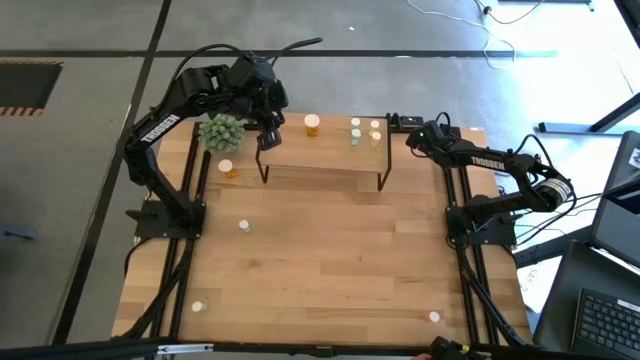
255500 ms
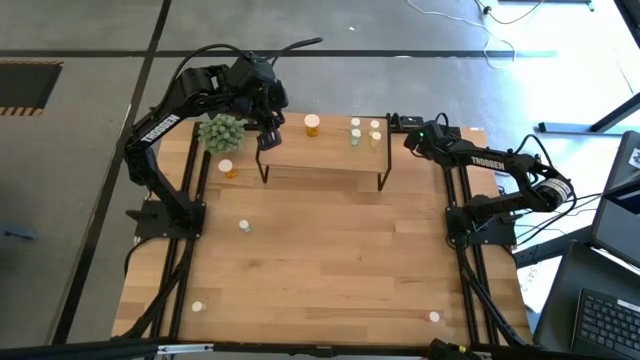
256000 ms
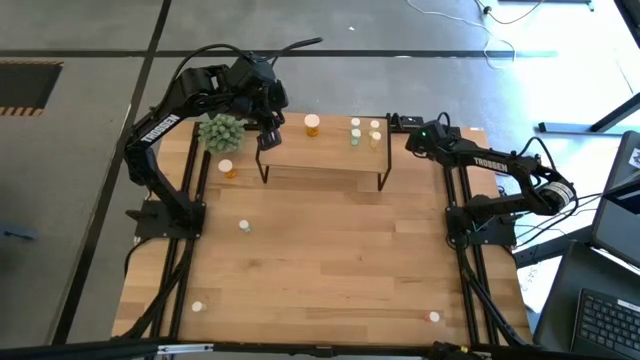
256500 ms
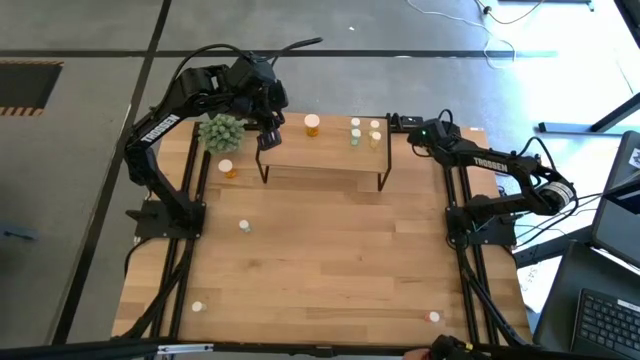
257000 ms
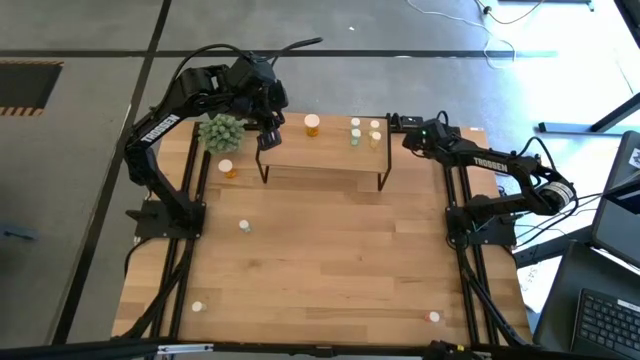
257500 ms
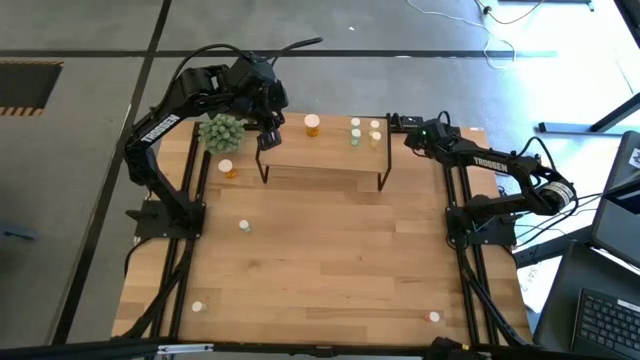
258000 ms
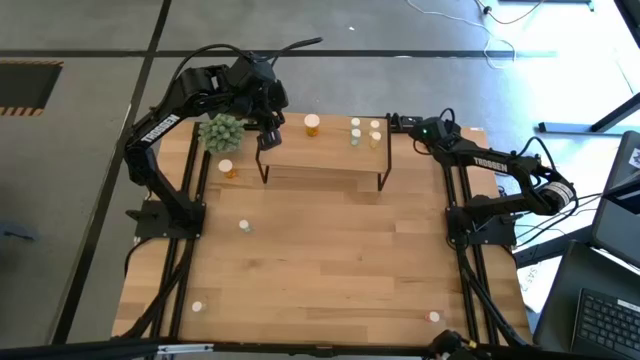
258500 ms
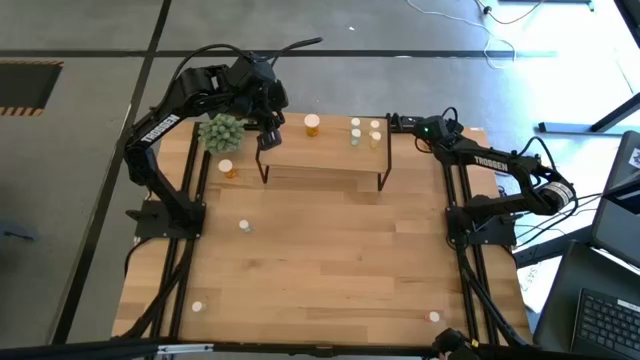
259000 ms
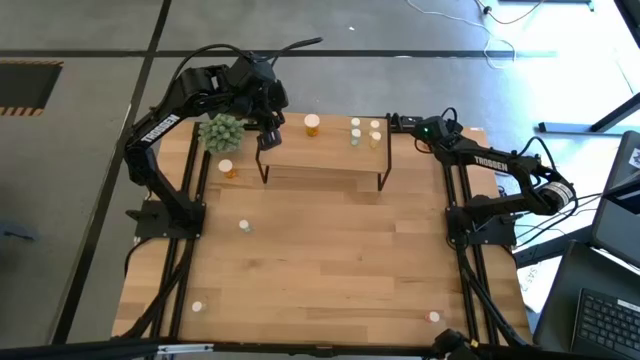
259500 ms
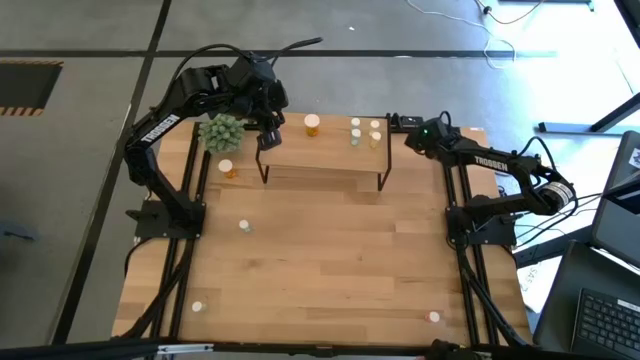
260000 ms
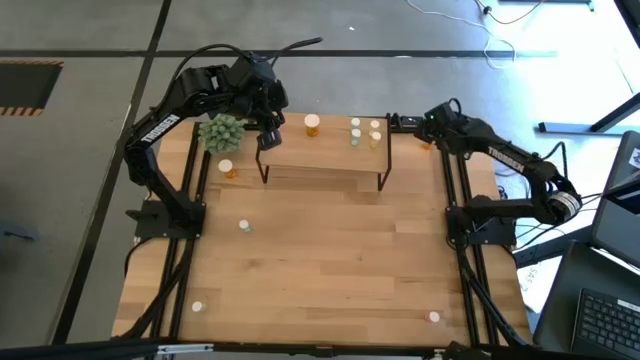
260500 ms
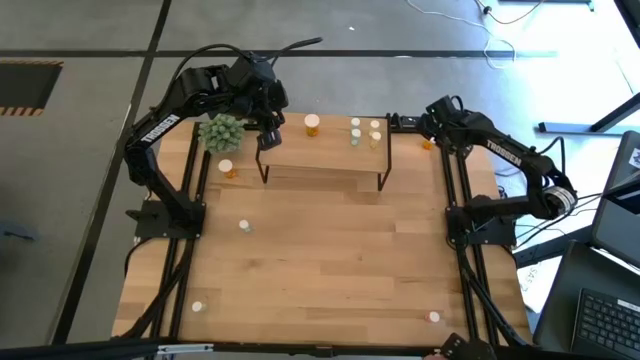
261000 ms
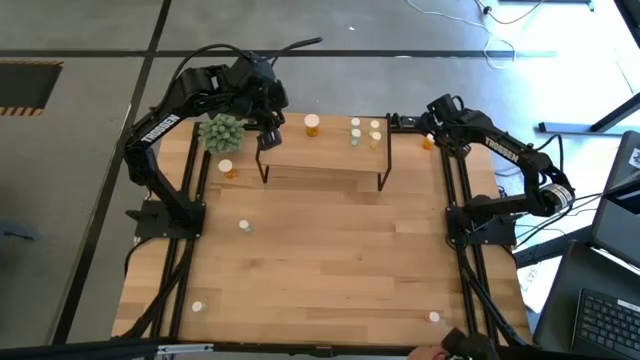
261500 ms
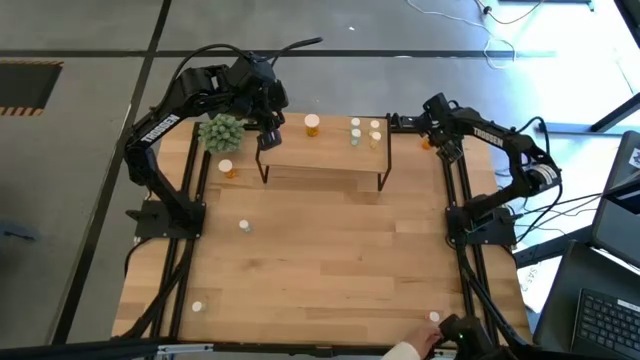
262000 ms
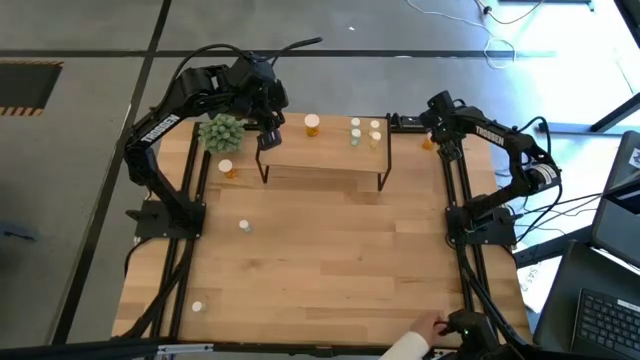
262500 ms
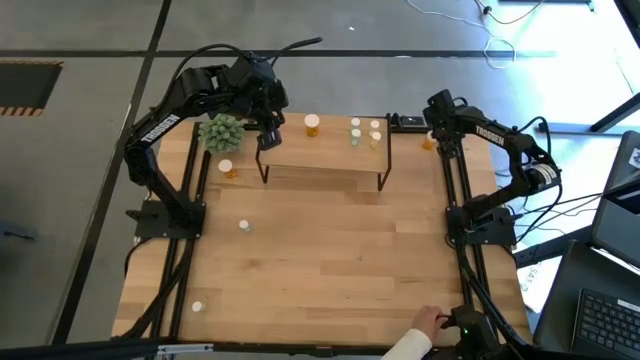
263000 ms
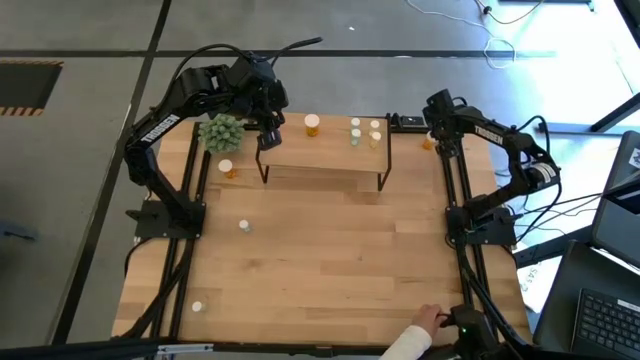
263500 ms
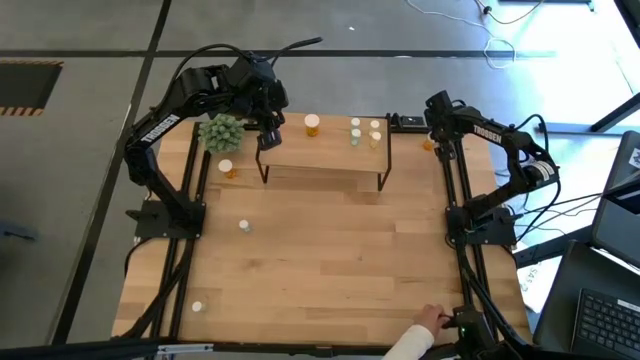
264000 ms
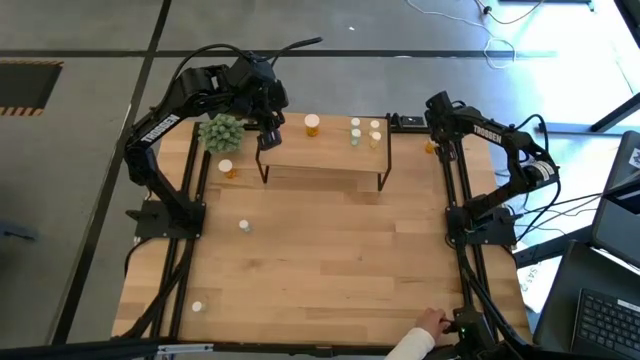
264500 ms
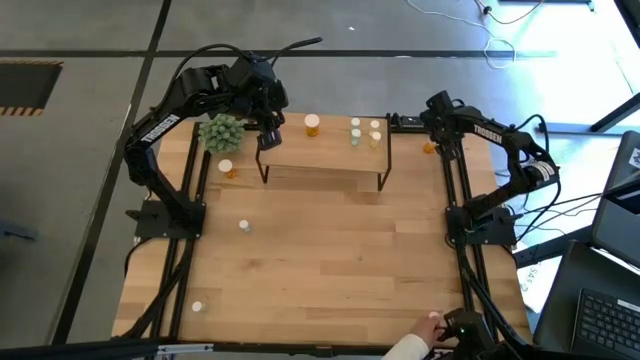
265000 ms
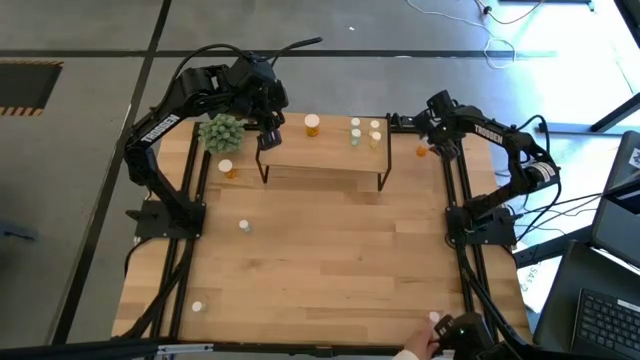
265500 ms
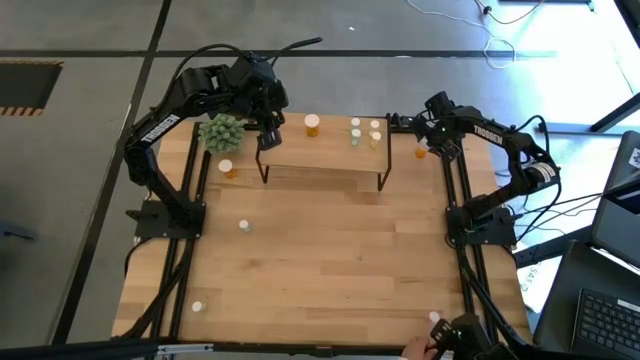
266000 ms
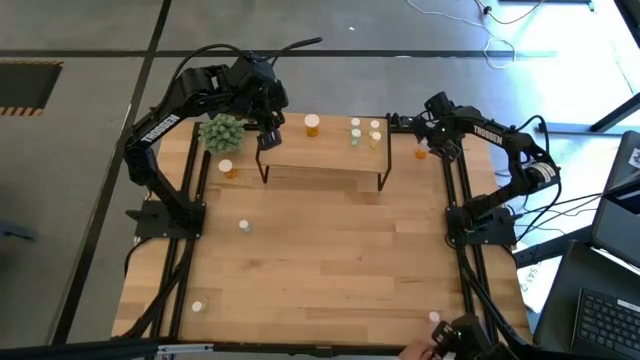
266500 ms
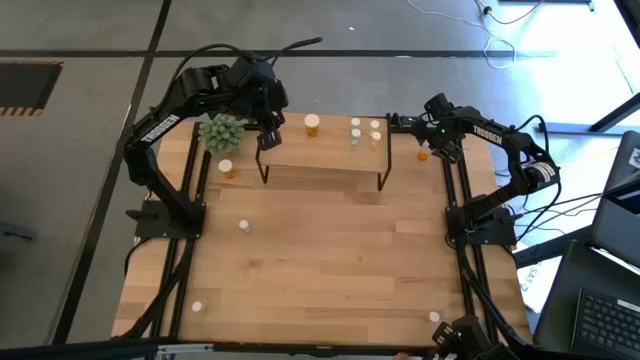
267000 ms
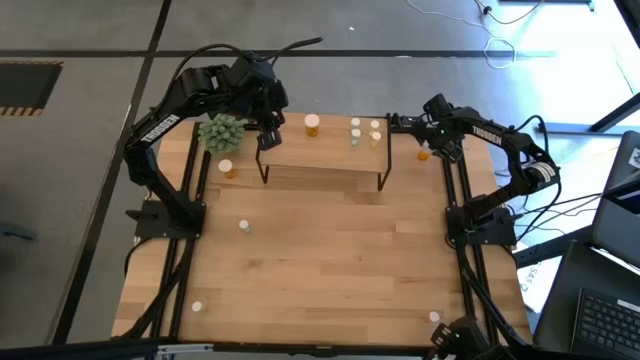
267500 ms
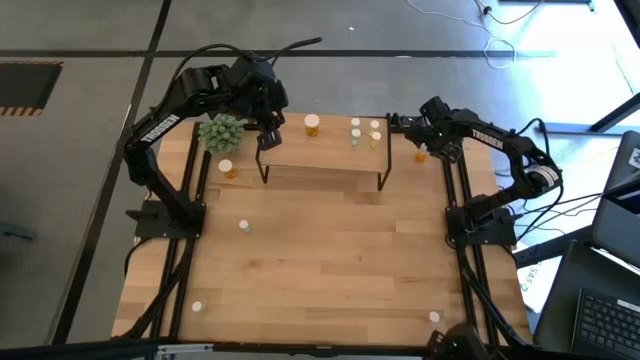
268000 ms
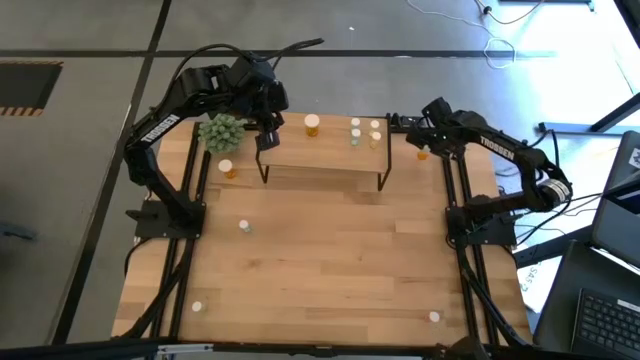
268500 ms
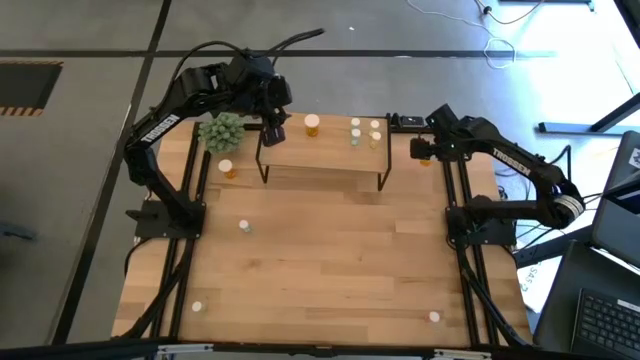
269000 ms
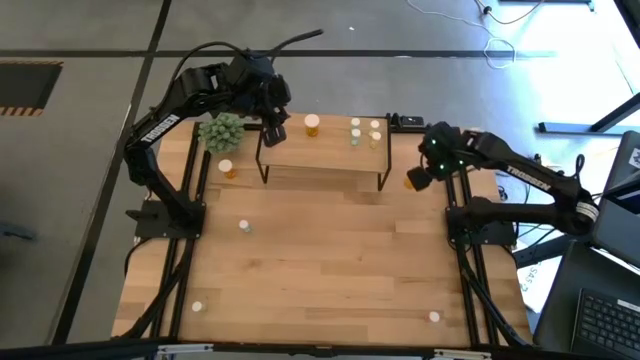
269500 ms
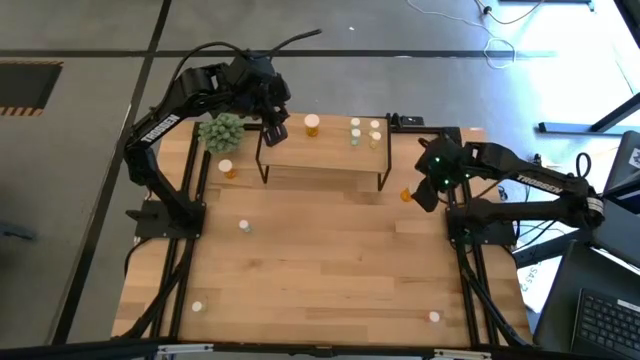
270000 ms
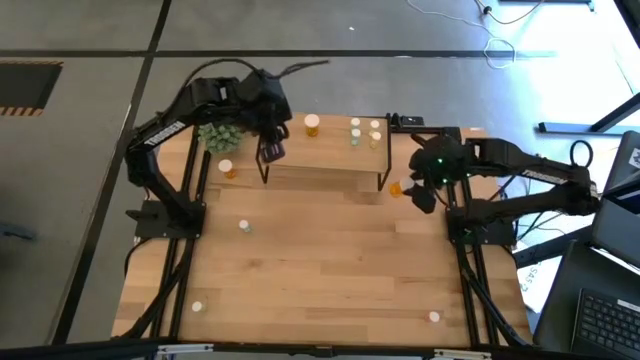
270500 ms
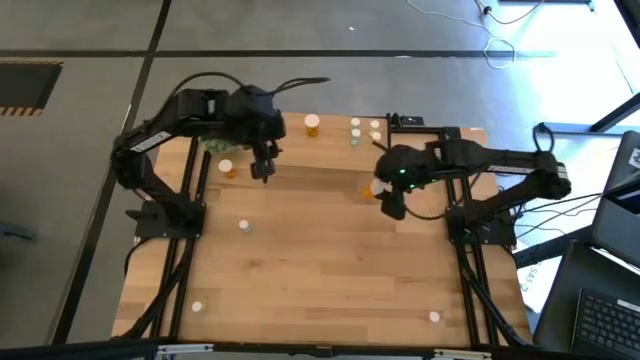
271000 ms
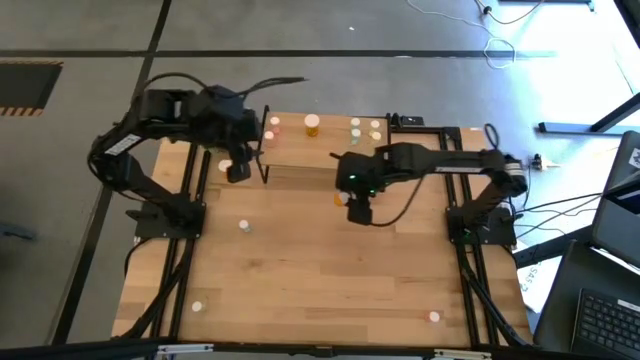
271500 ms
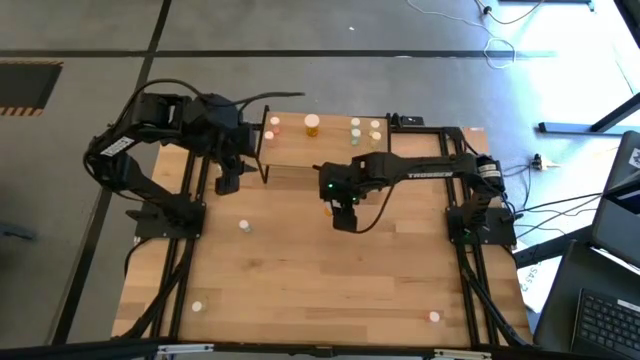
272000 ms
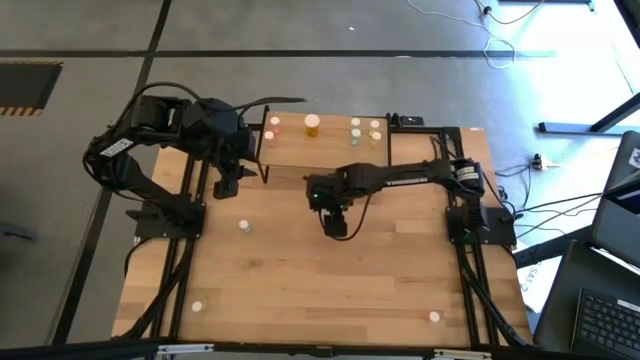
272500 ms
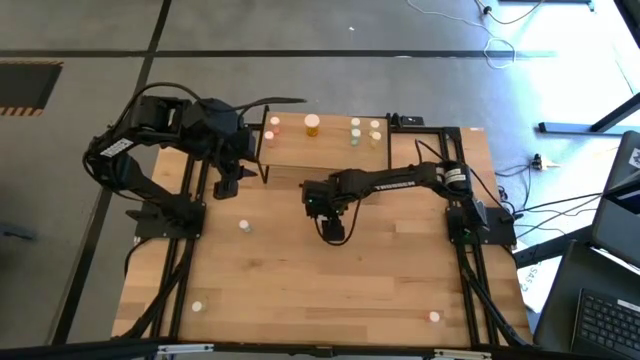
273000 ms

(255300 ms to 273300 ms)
Task: Pick and place medicine bottles onto shelf by color
Put the orange medicine bottle on the shelf, aligned with the other orange medicine bottle

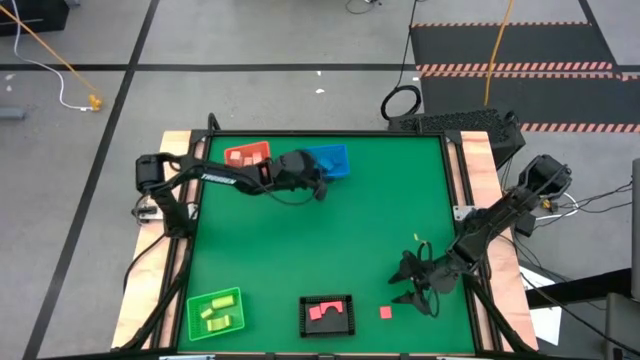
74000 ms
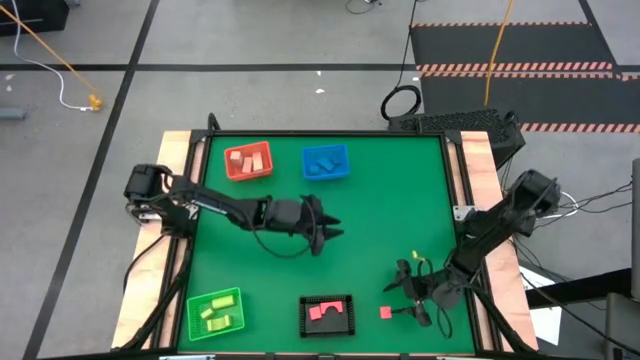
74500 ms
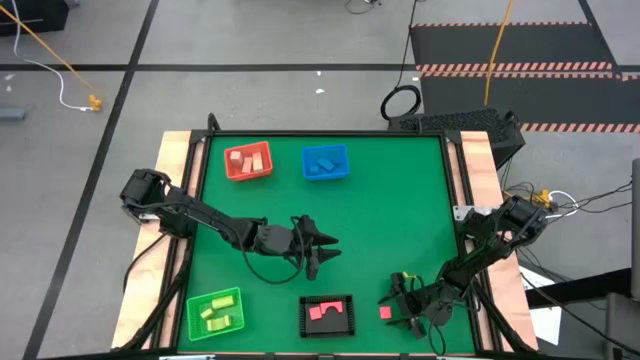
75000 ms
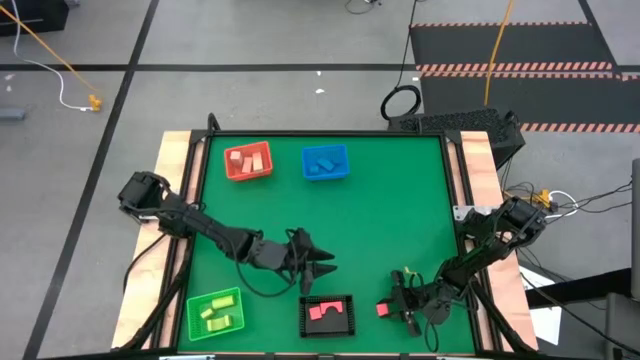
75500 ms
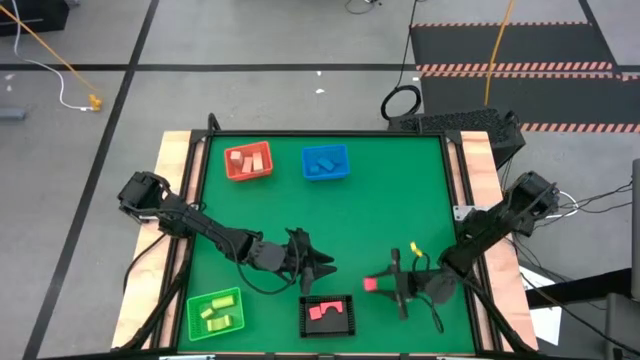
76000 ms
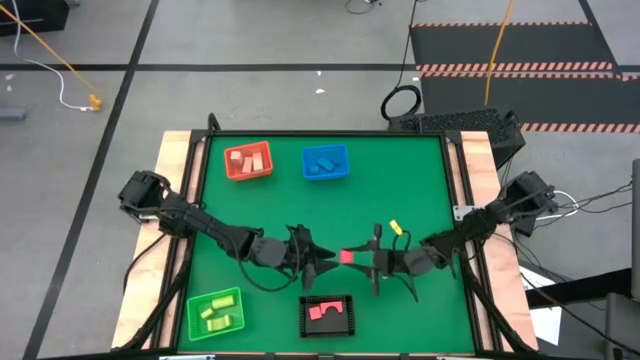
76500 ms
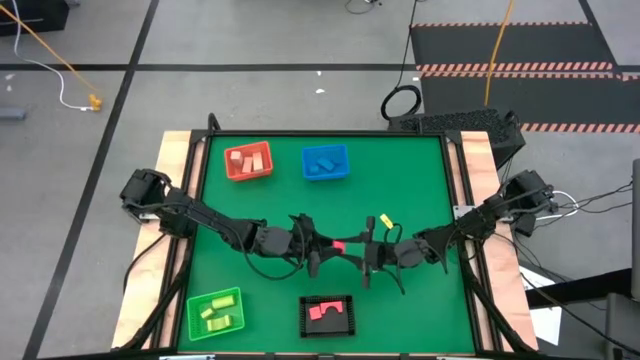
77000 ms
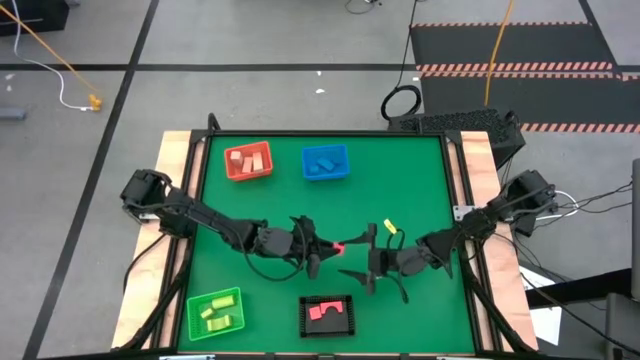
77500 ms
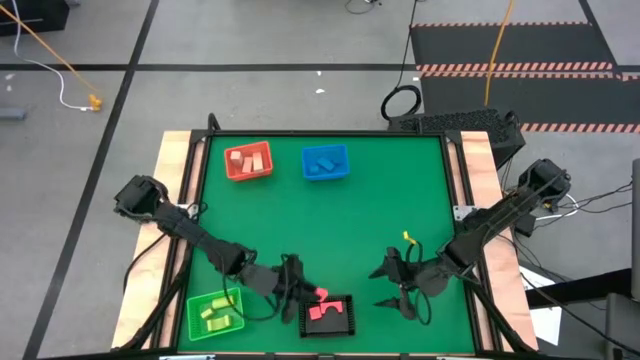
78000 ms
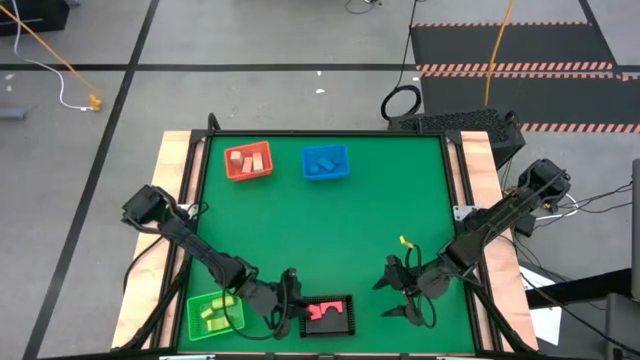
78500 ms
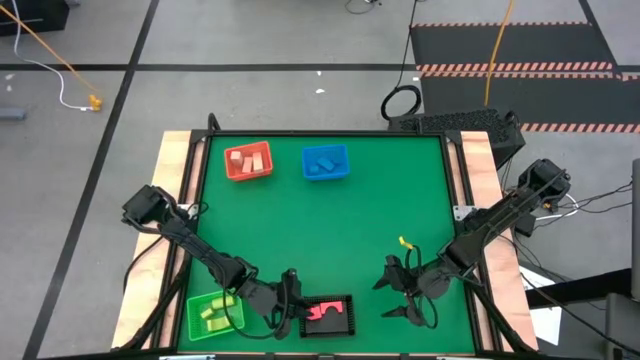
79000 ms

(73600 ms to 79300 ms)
Task: Sort & place blocks by color
Put the red block into the black bin
